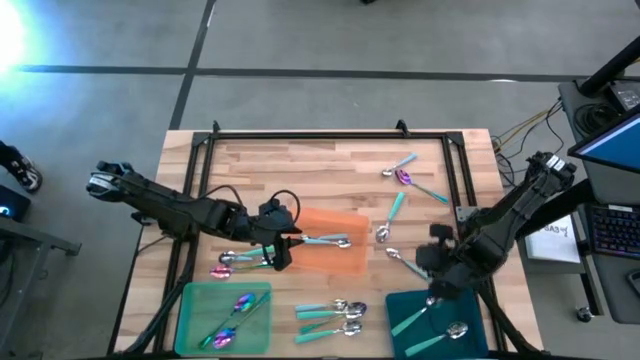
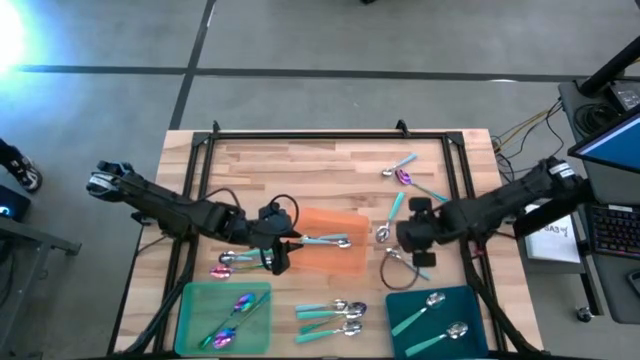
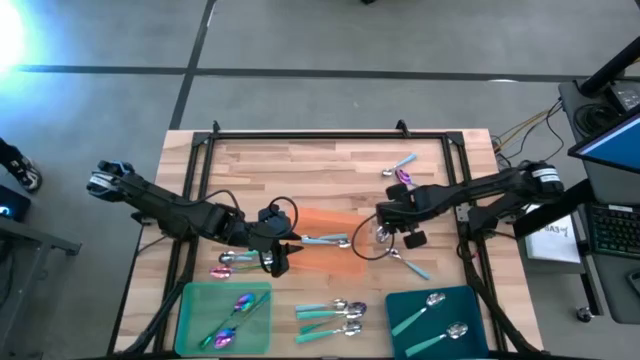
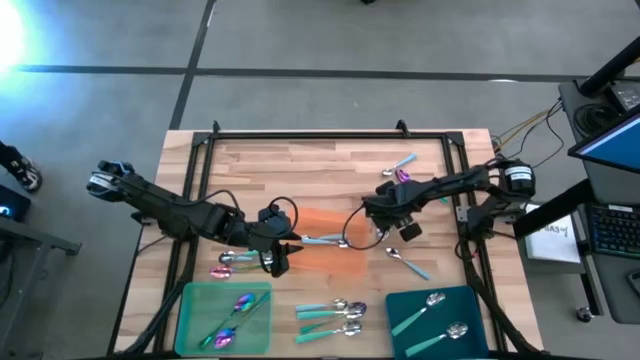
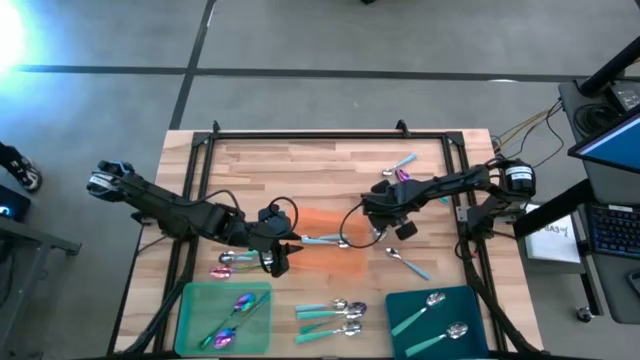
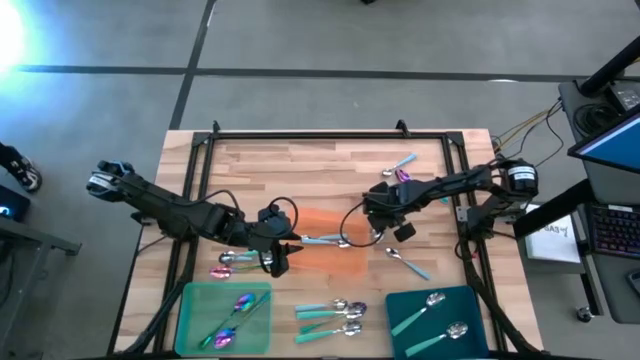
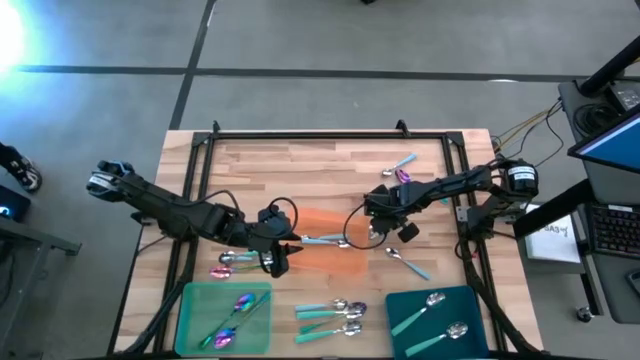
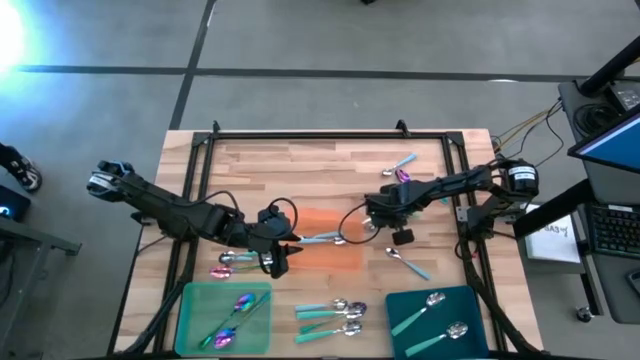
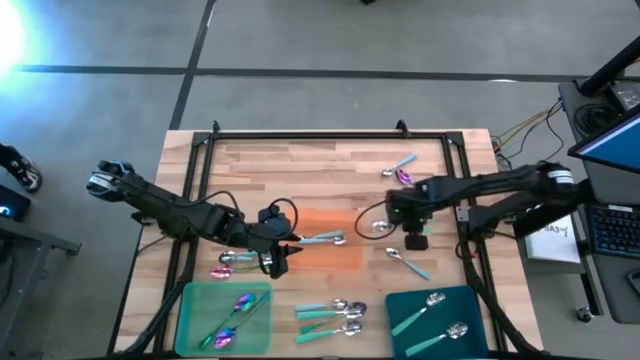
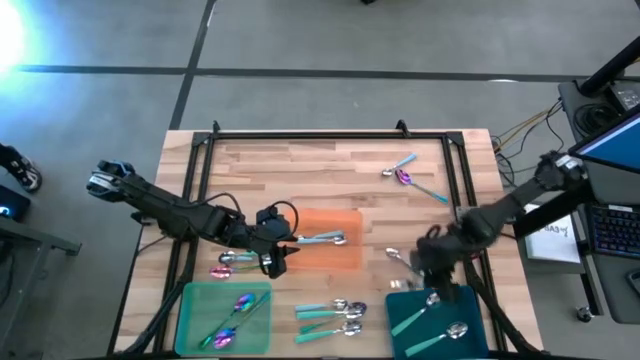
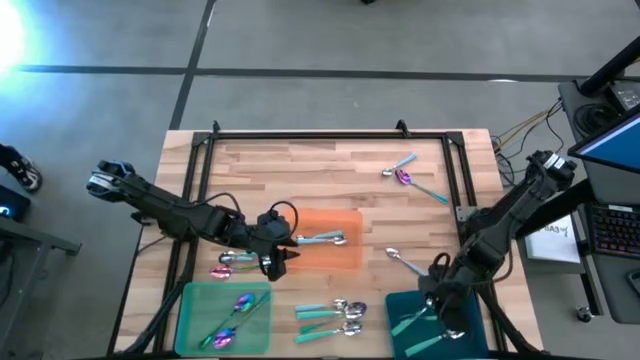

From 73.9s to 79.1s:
Task: Sort silverware by color (type)
Put the green spoon into the blue bin

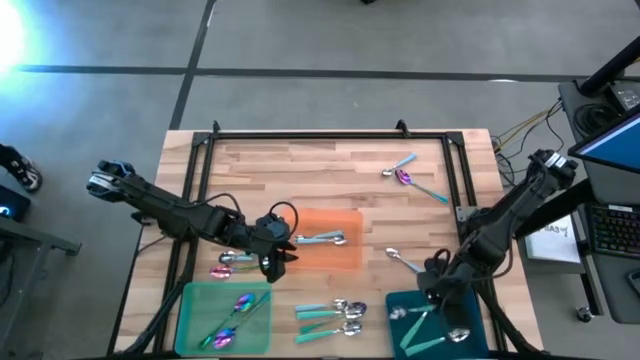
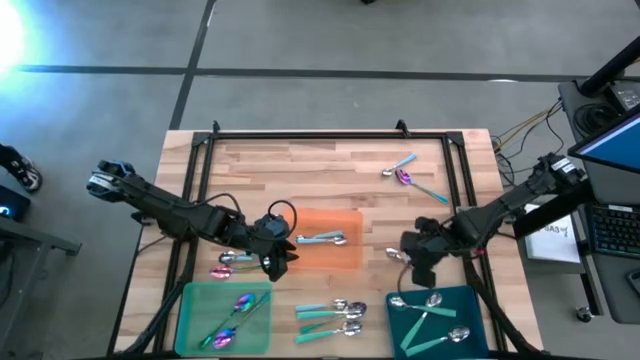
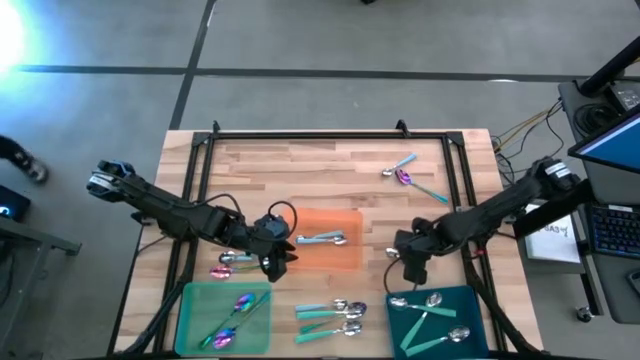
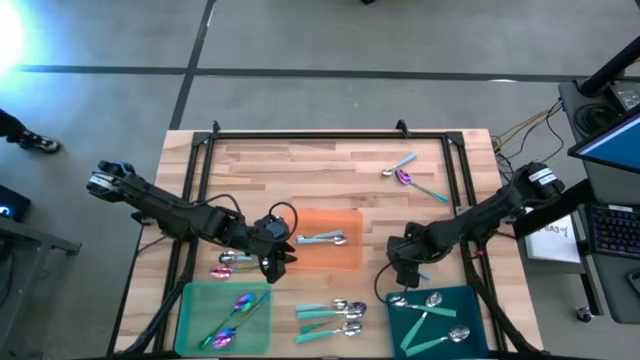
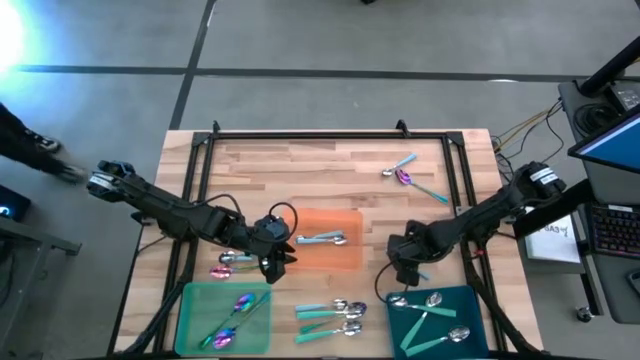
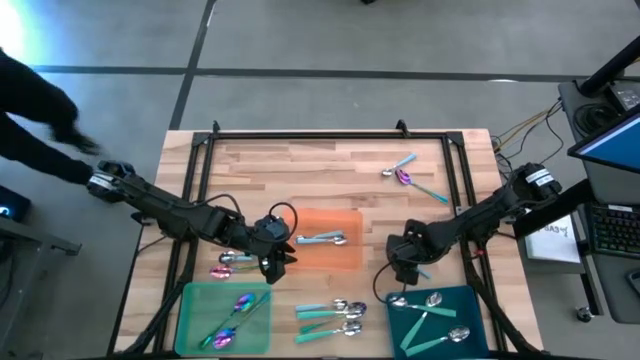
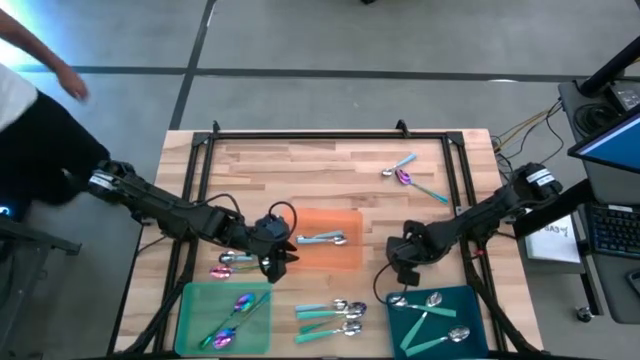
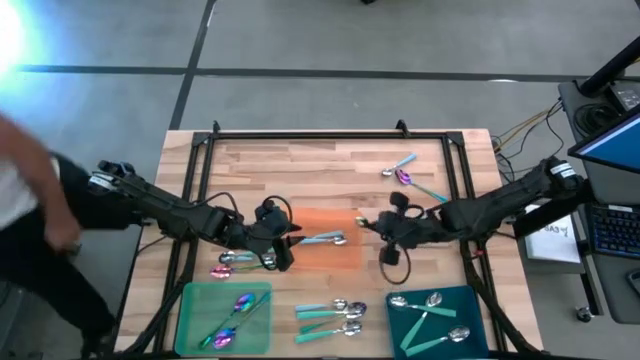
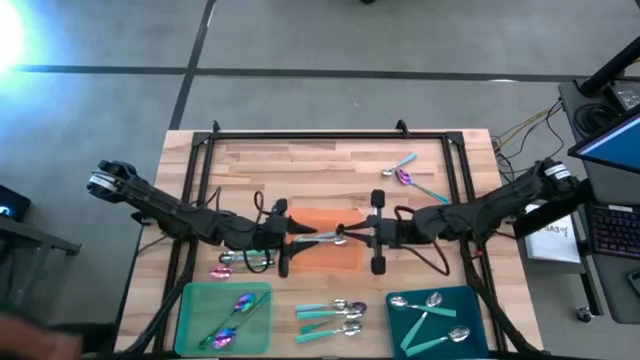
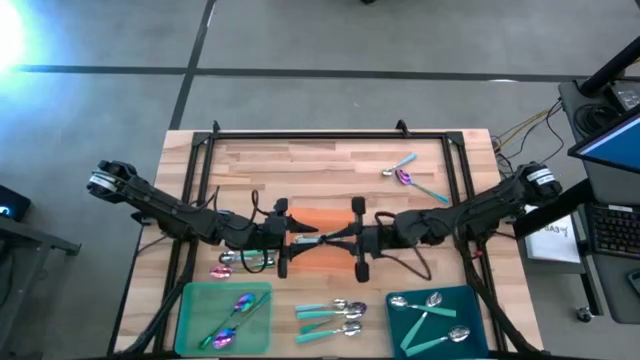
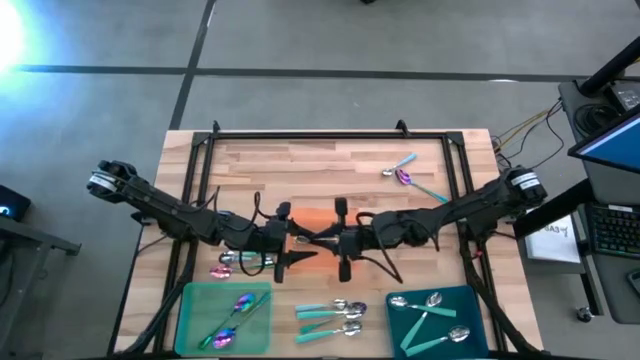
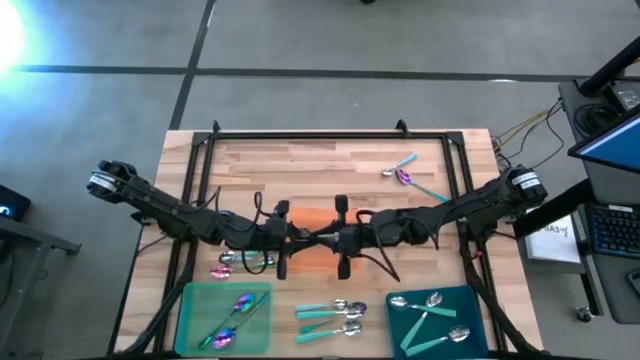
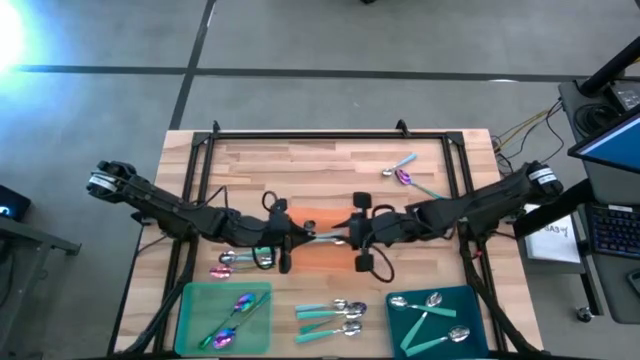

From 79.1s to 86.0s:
Put the blue spoon into the orange bin

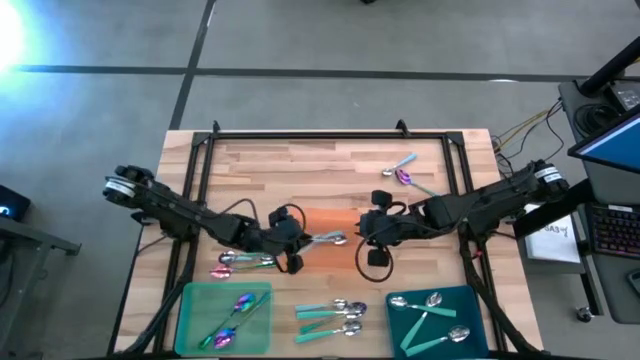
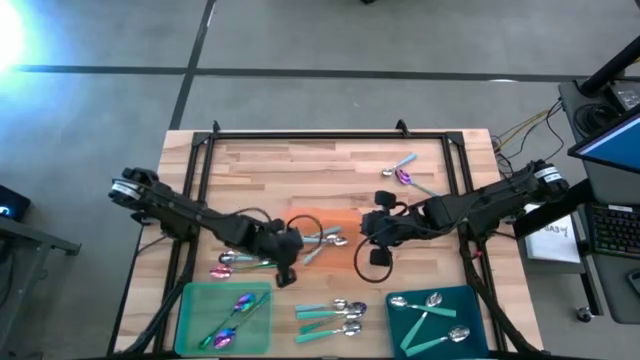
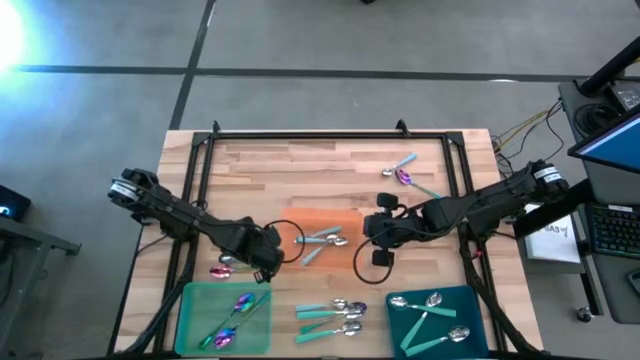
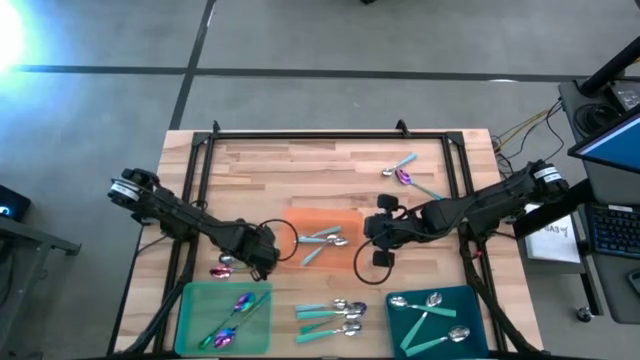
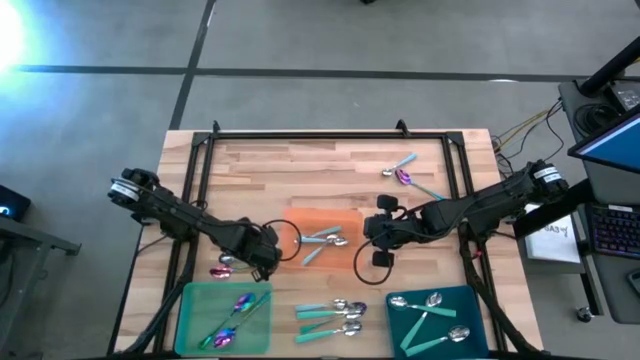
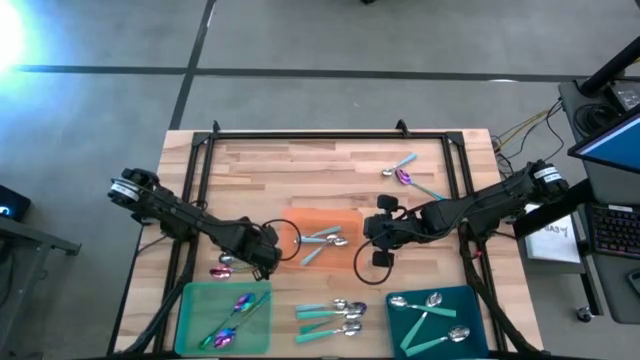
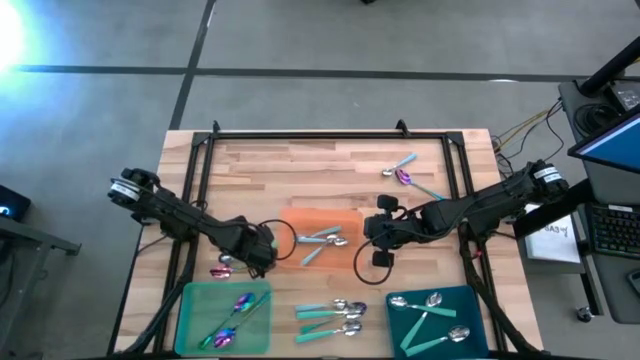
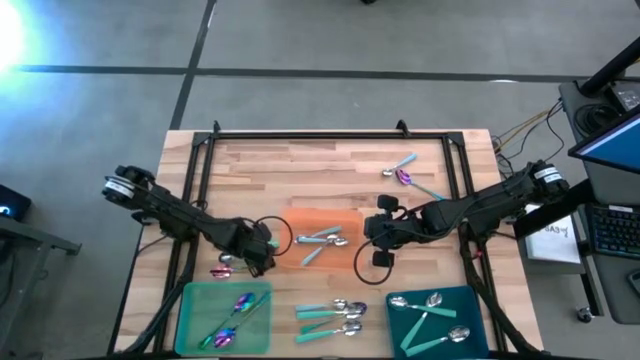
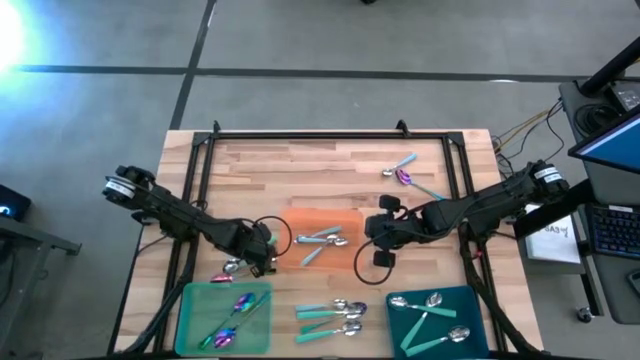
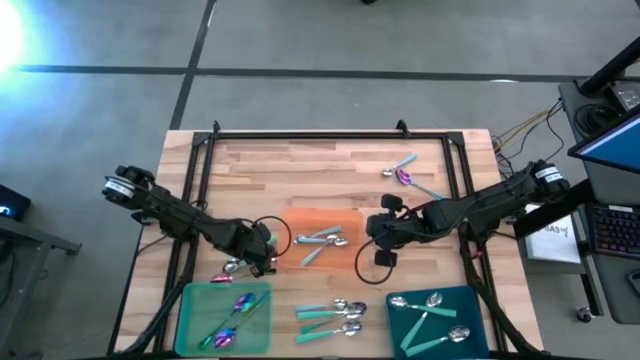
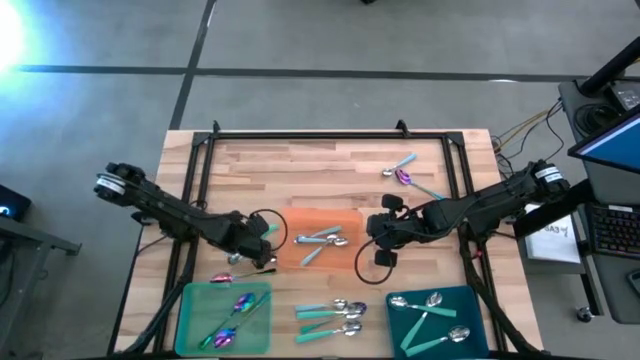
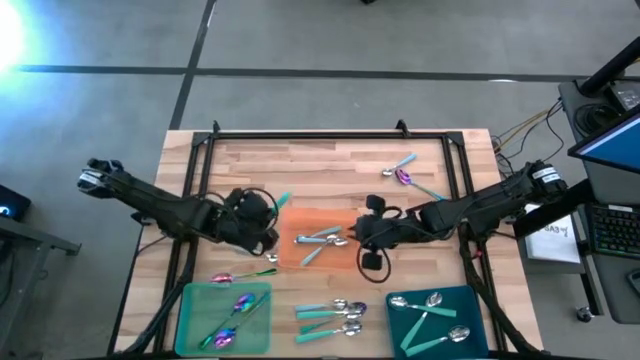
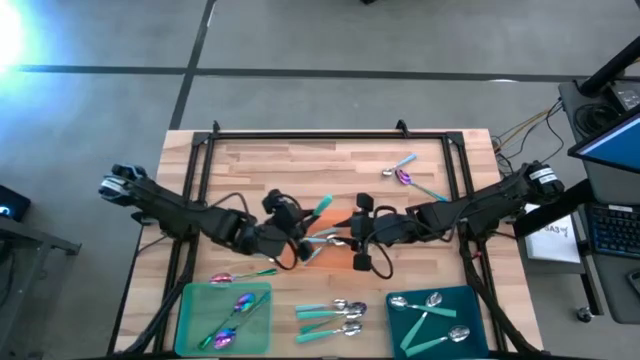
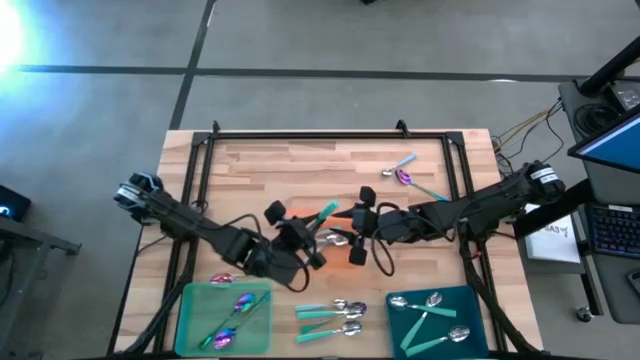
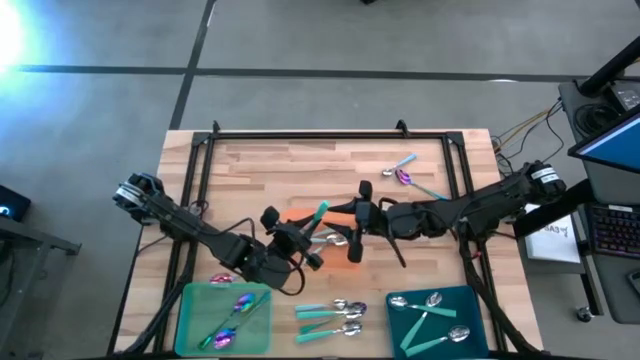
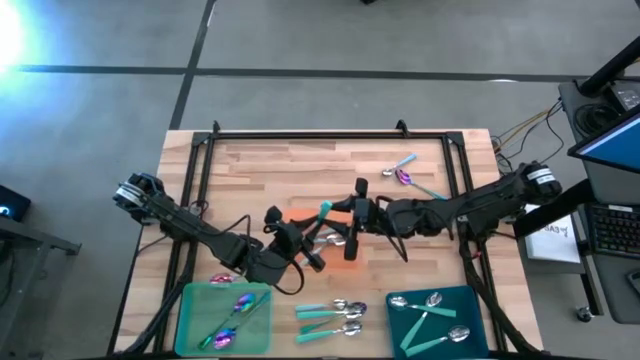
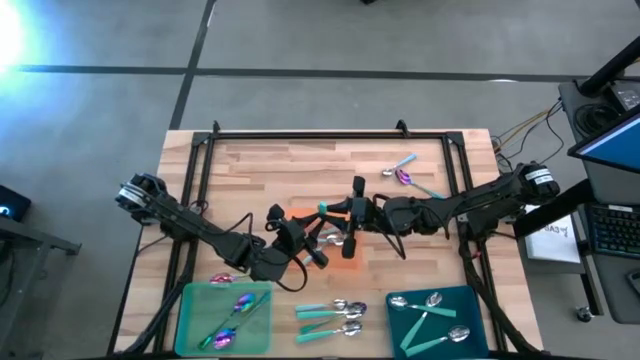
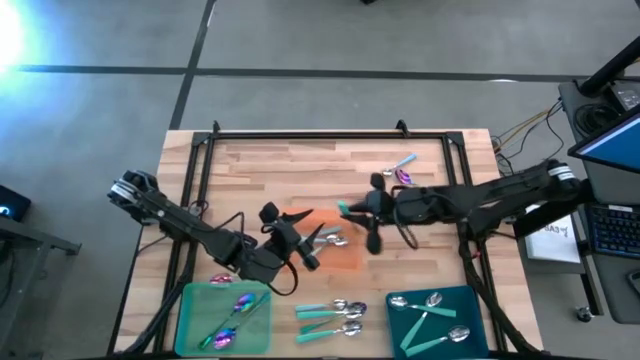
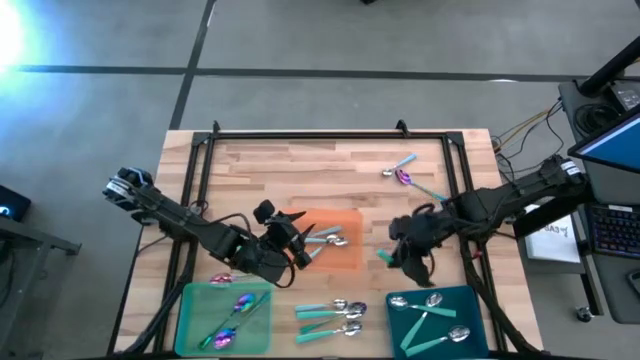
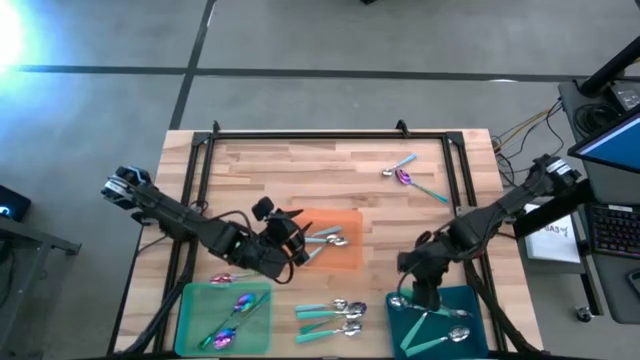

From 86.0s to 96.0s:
Put the green spoon into the blue bin
